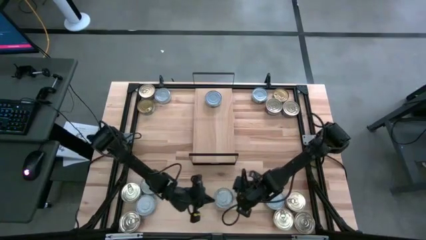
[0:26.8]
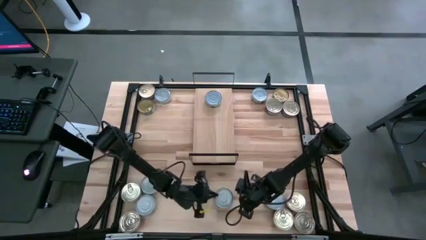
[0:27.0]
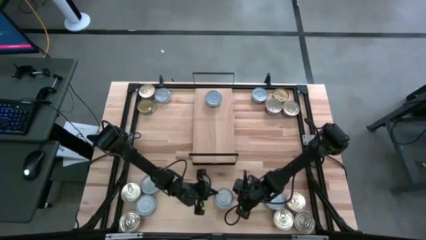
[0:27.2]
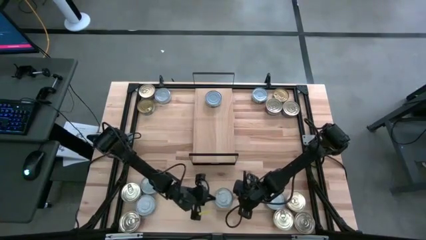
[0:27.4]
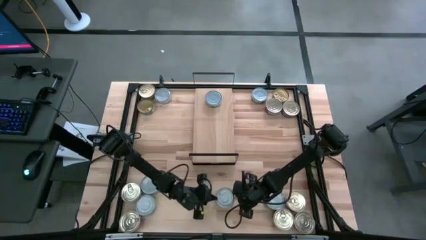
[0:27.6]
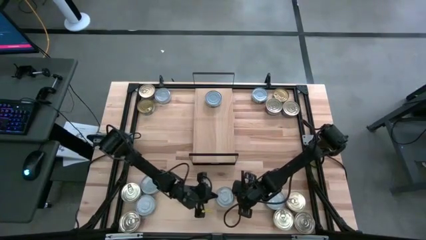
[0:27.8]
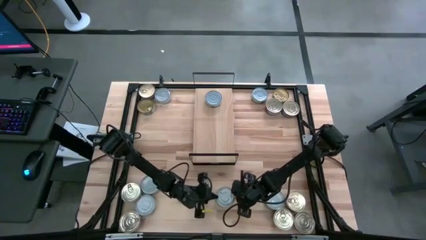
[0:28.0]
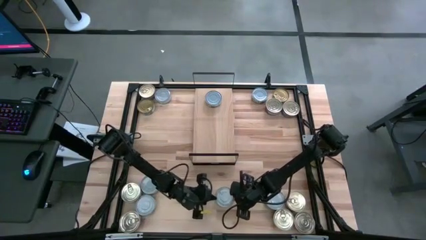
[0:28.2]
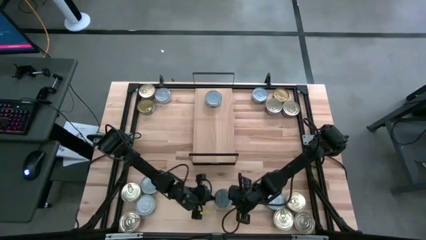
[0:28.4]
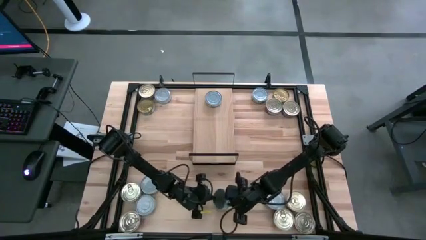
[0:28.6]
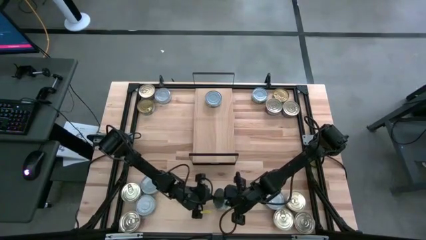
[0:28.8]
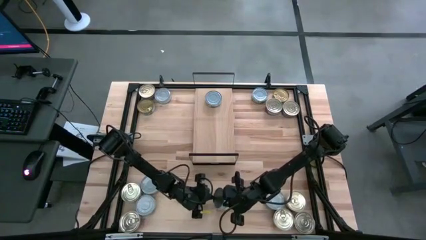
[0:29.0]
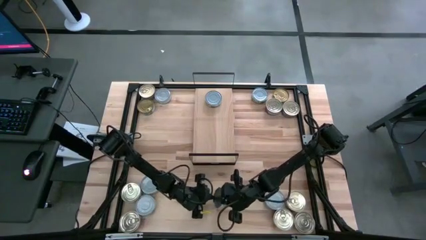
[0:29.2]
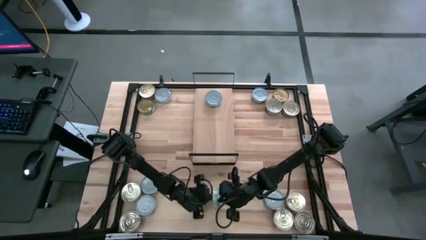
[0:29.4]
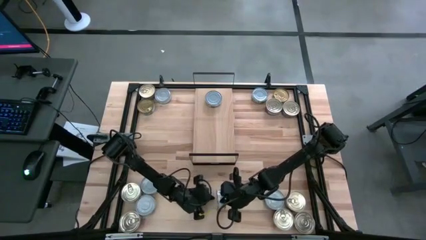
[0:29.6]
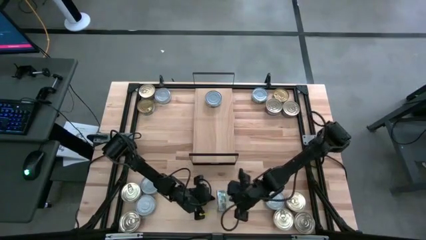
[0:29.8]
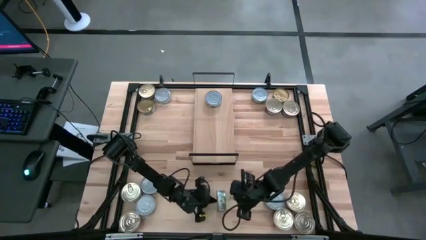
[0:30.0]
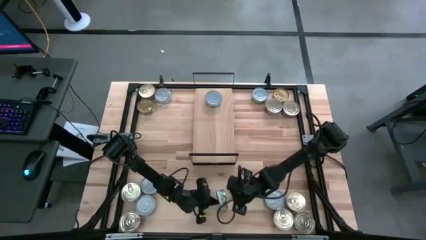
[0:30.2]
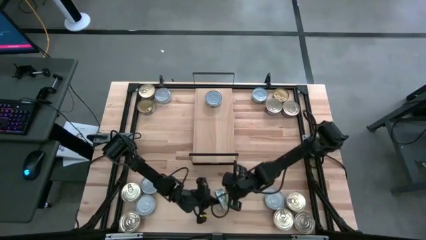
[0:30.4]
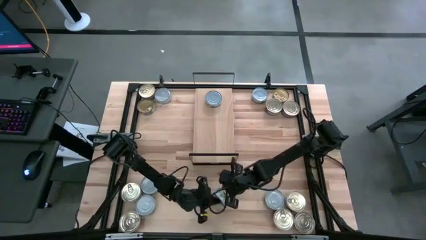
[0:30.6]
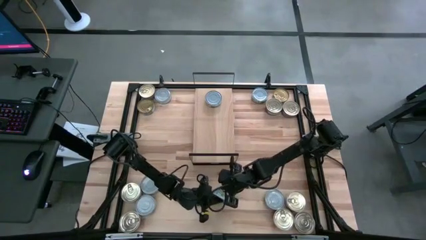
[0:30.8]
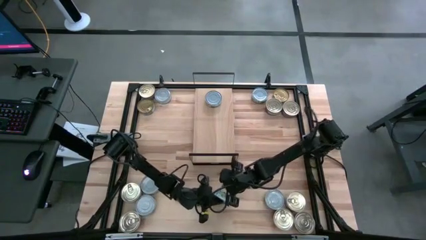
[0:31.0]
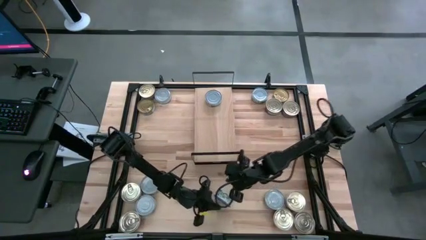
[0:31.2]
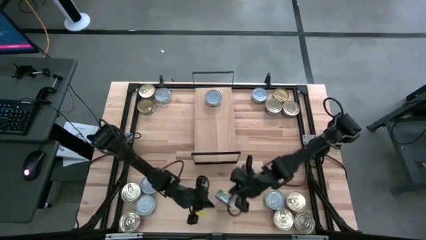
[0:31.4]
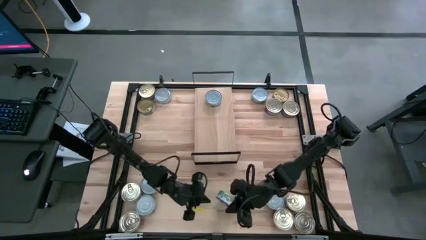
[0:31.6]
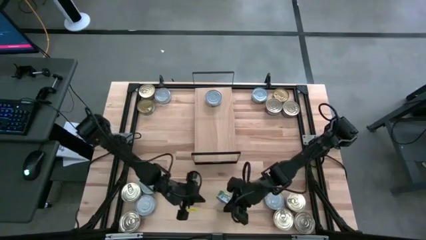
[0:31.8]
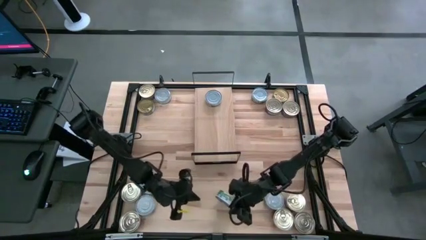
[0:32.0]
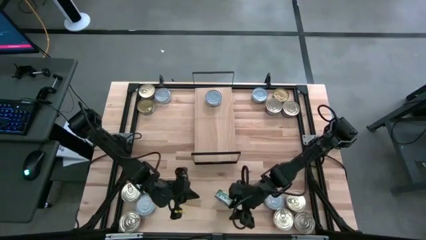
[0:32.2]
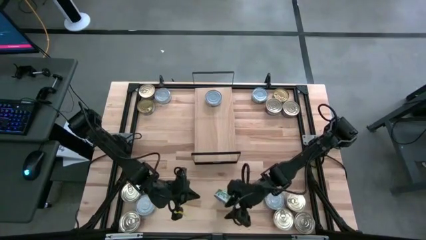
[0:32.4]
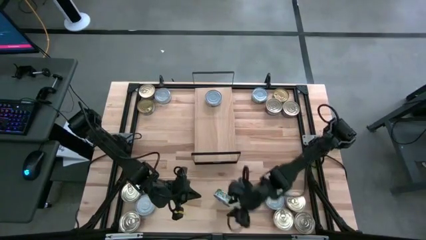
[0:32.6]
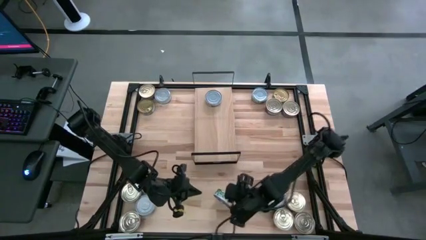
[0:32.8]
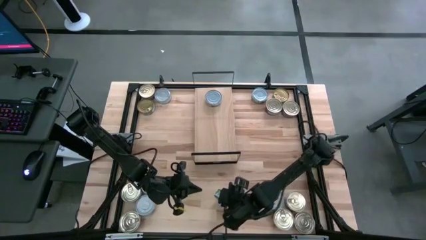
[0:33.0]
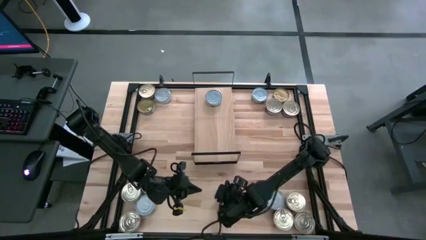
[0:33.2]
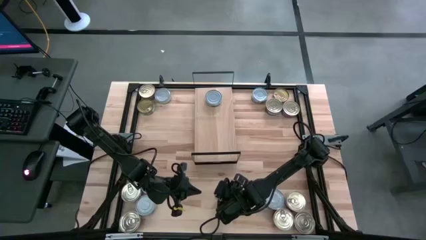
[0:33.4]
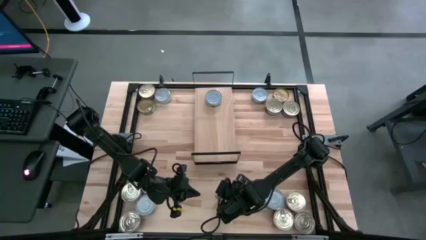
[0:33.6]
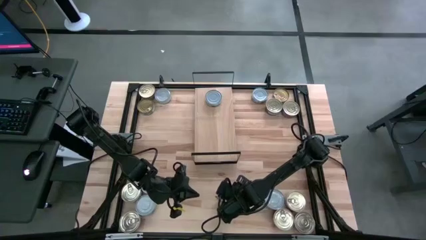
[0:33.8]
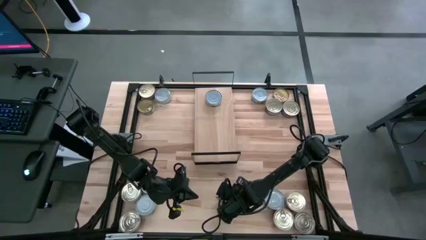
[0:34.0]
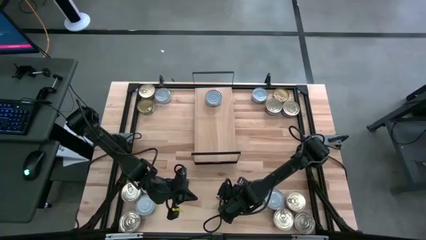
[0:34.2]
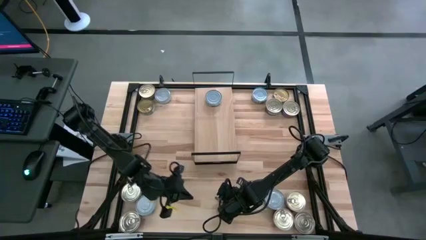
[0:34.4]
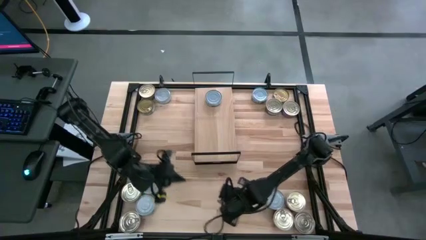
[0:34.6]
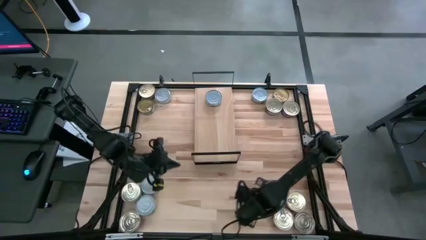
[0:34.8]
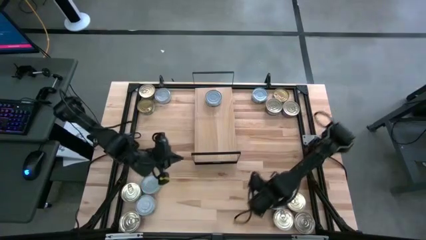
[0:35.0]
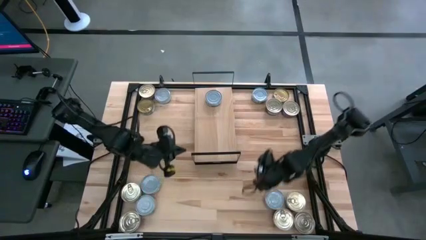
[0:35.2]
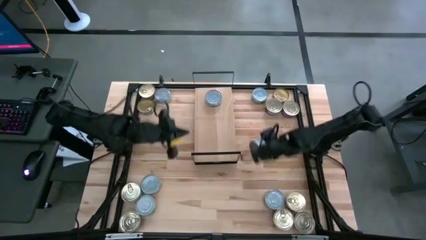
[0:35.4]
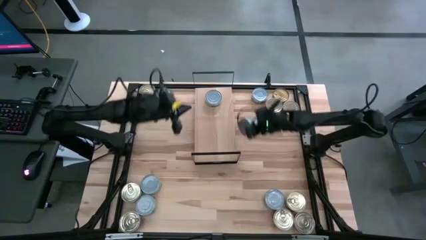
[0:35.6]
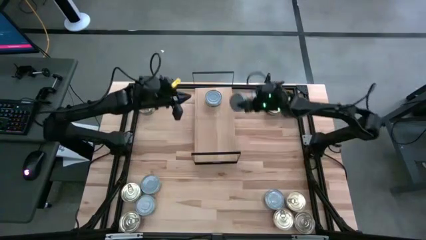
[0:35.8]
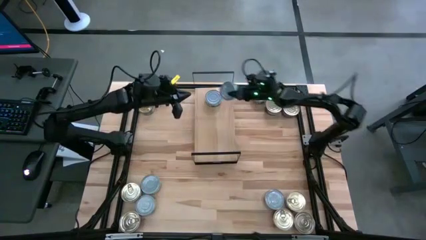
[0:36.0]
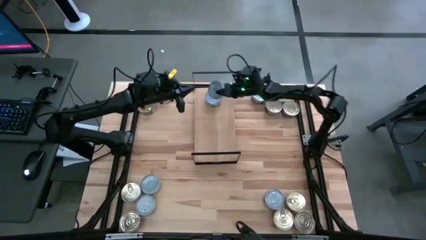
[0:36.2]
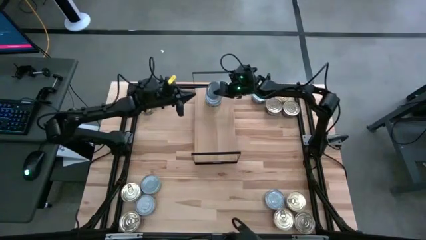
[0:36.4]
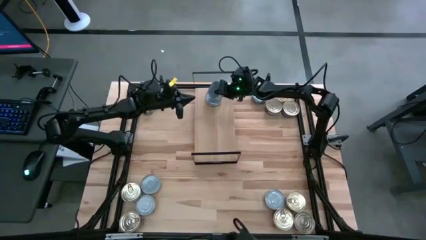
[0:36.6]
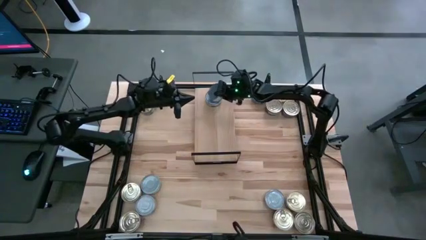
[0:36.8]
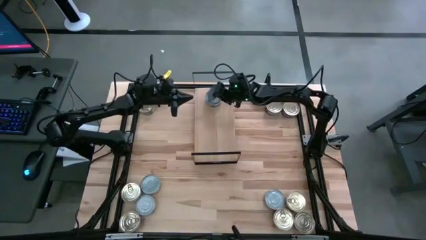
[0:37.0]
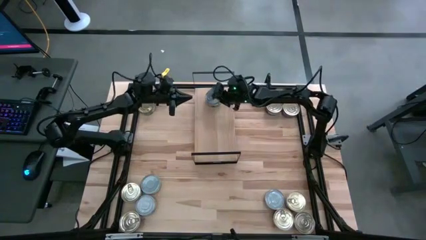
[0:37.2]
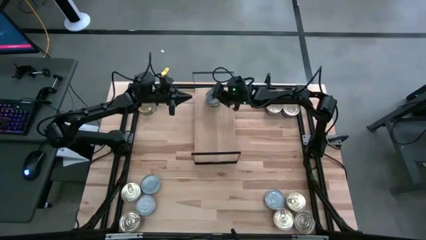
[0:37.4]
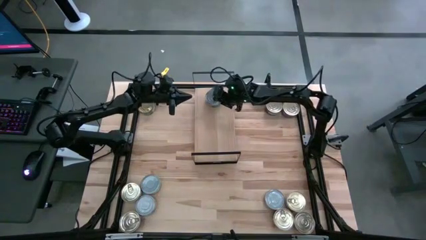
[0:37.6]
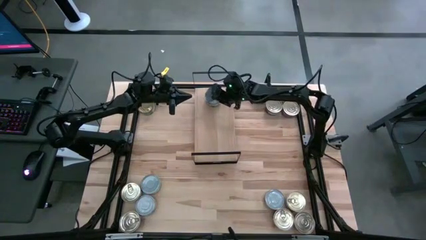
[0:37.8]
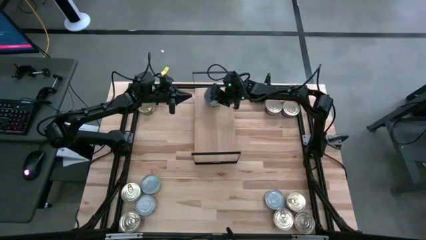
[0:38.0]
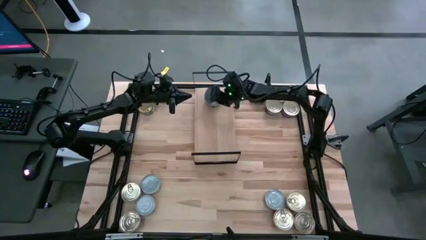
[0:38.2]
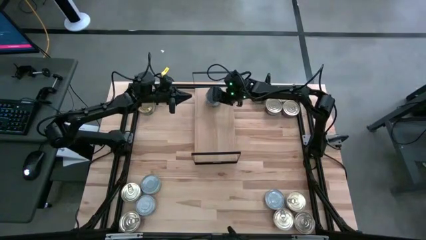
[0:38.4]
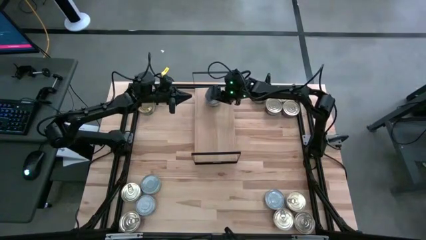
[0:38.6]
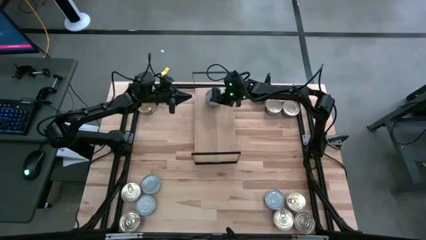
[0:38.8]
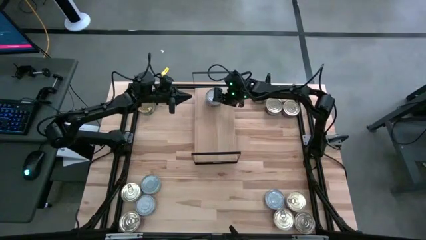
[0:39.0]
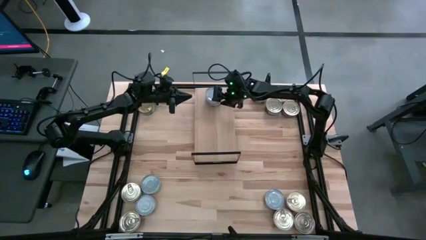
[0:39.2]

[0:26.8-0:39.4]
Task: Stack canned seafood by type on shelf
Stack the green tuna can on top of the green tuna can

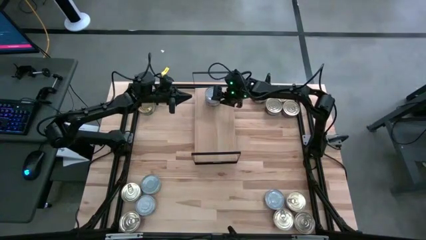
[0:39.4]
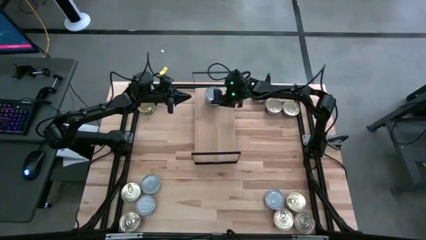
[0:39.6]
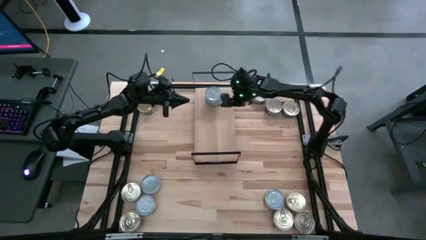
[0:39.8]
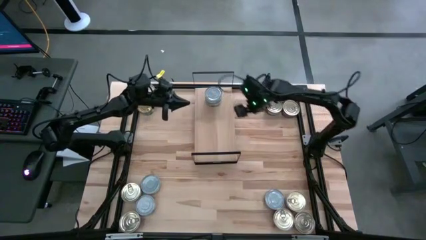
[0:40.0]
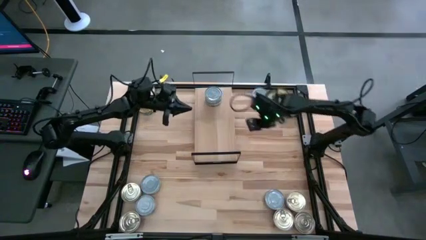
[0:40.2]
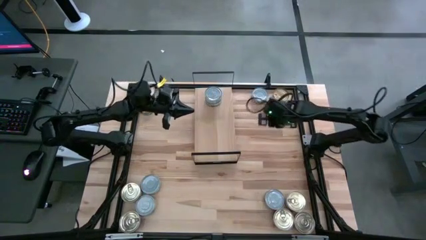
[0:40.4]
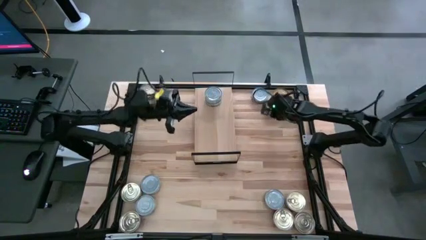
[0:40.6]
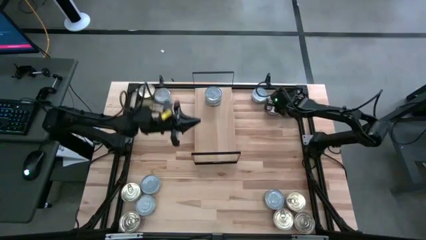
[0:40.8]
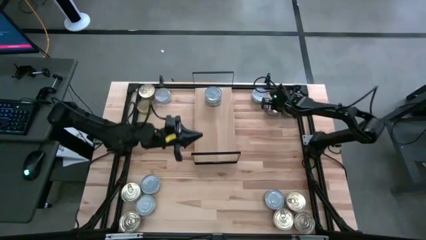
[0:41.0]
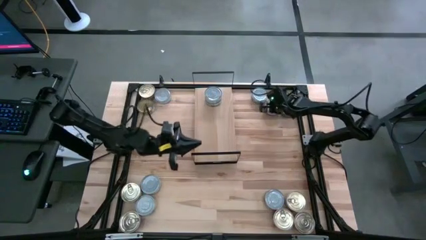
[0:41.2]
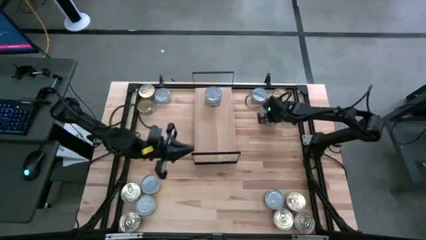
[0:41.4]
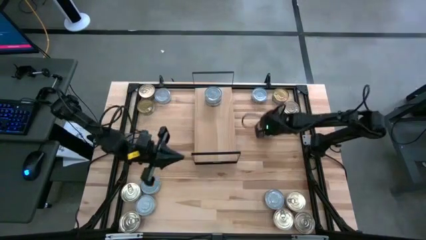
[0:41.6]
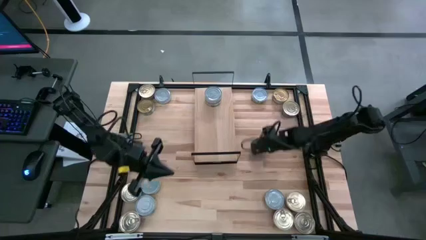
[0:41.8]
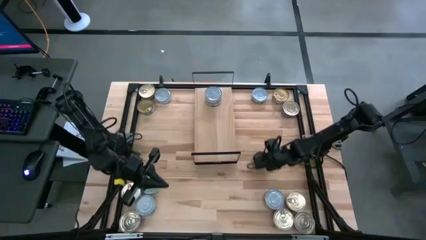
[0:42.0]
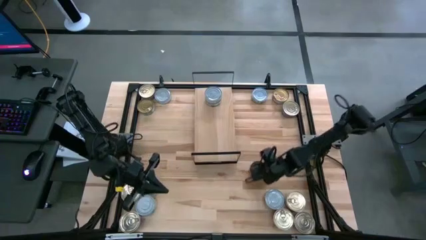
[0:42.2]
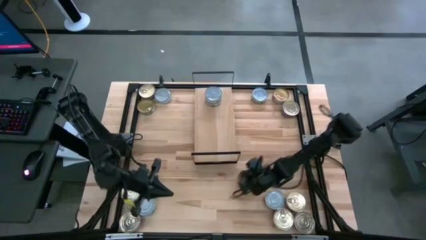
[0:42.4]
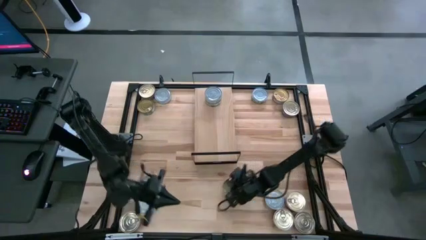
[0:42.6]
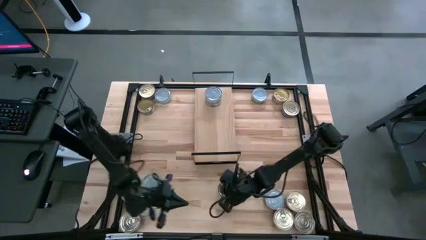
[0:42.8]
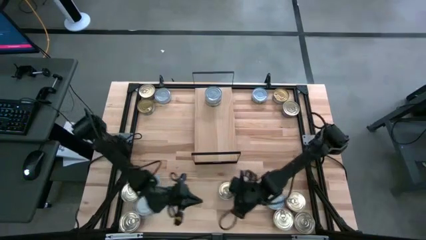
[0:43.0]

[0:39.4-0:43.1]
Move the pink and blue tuna can to the bottom middle of the table
